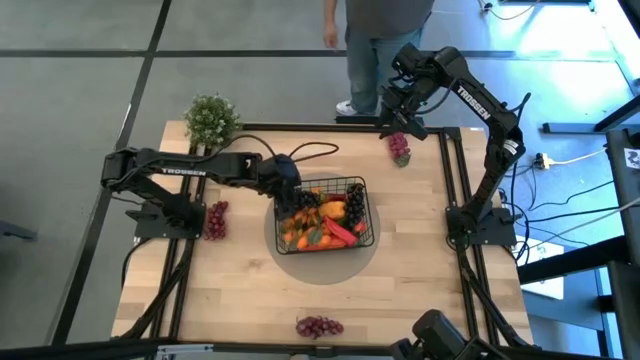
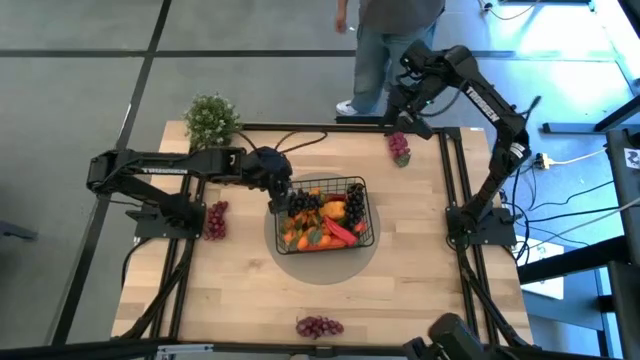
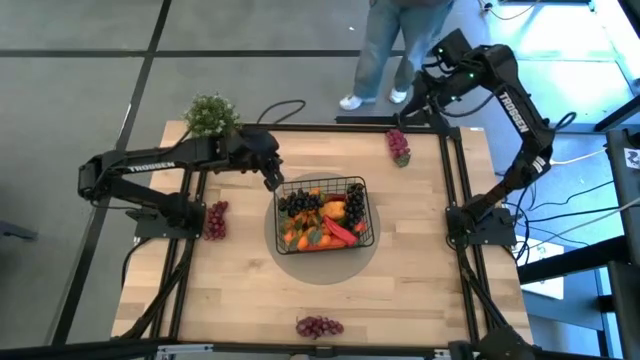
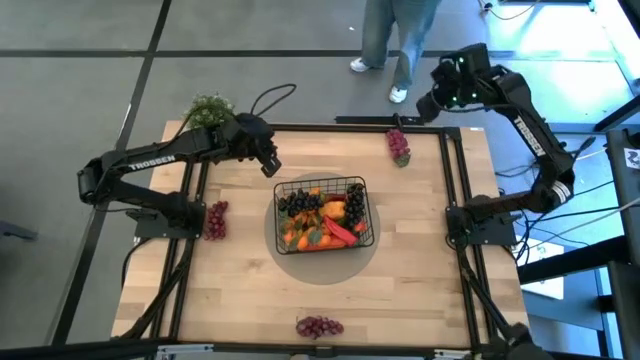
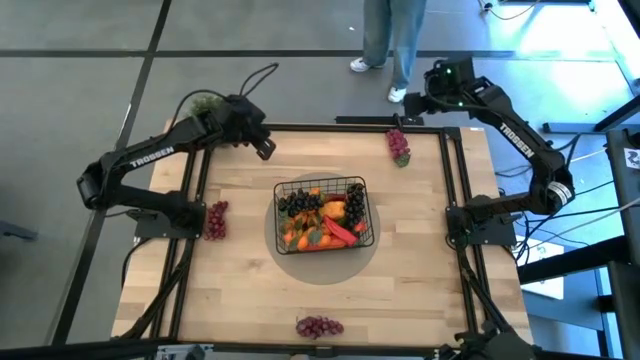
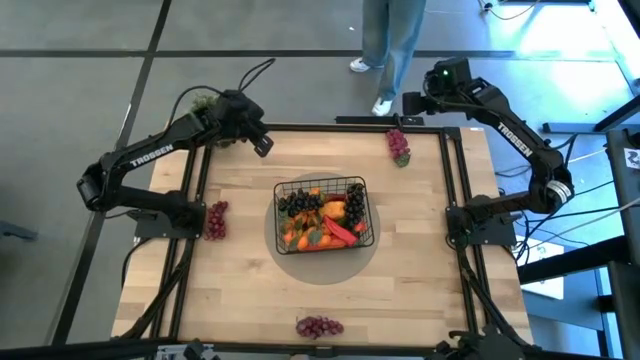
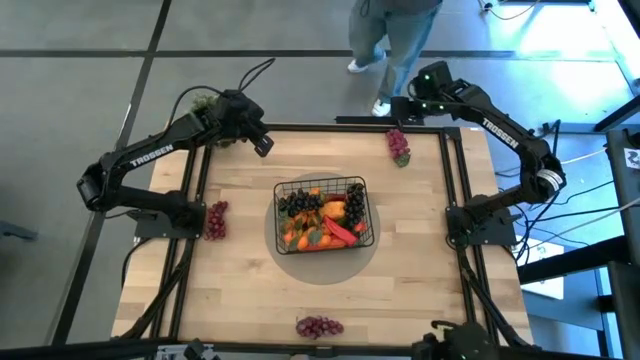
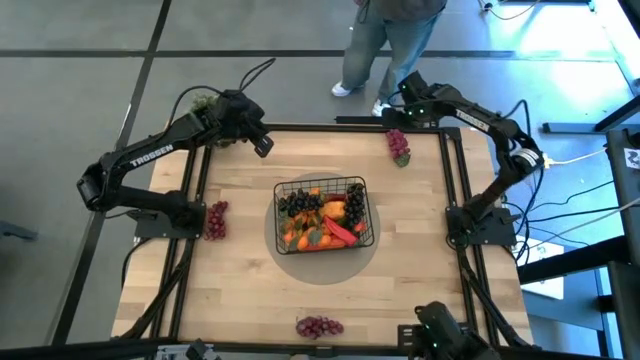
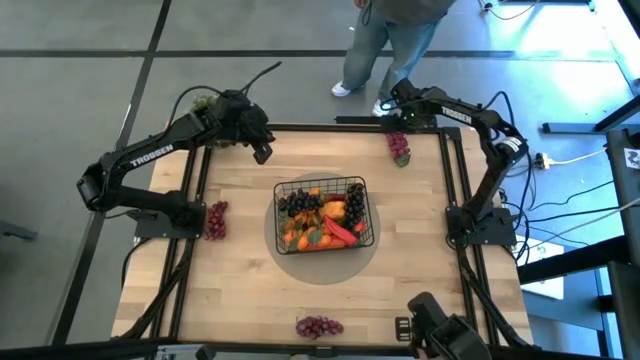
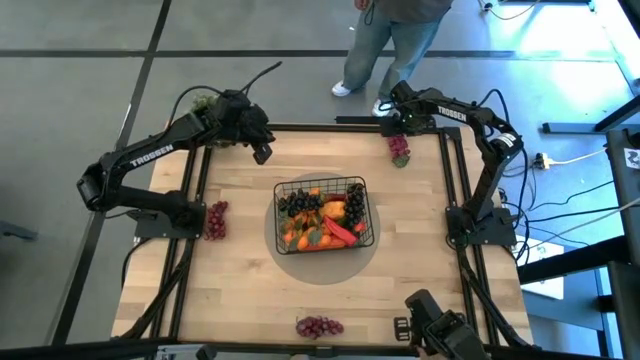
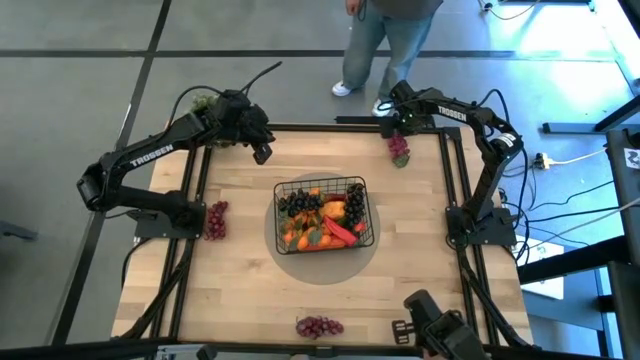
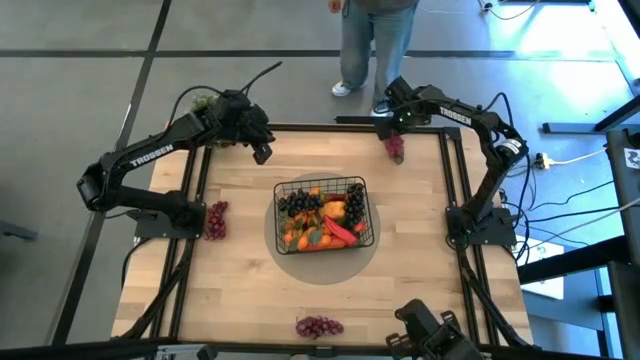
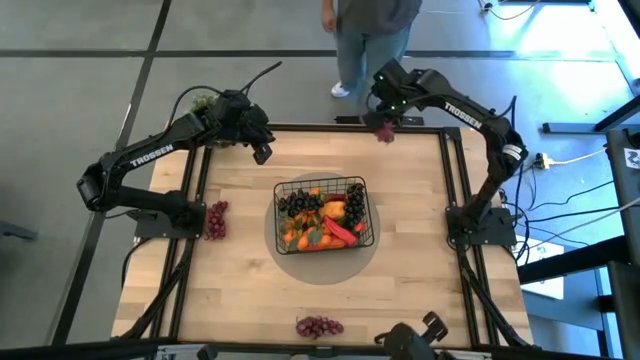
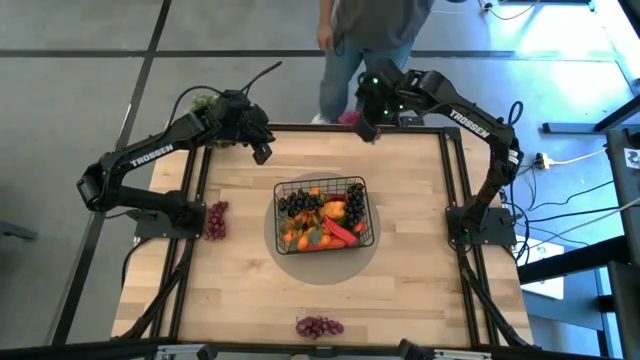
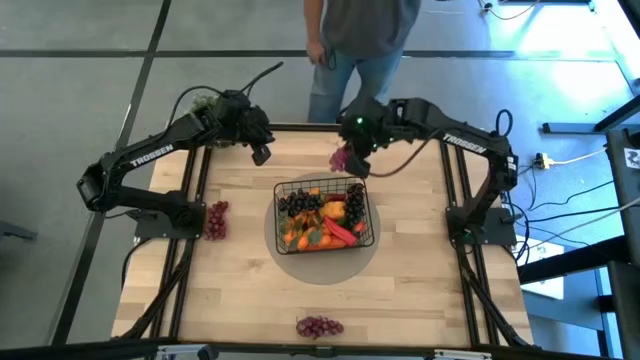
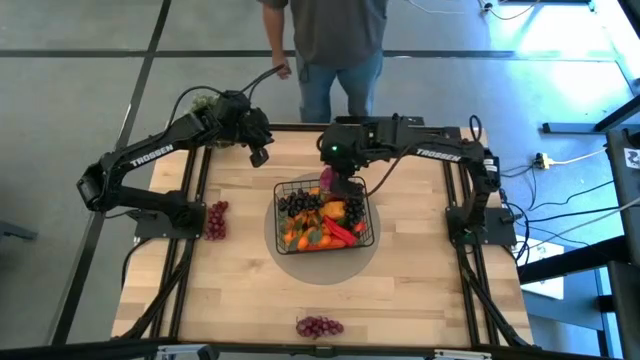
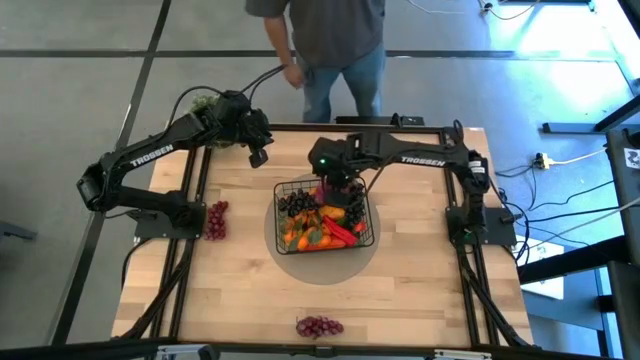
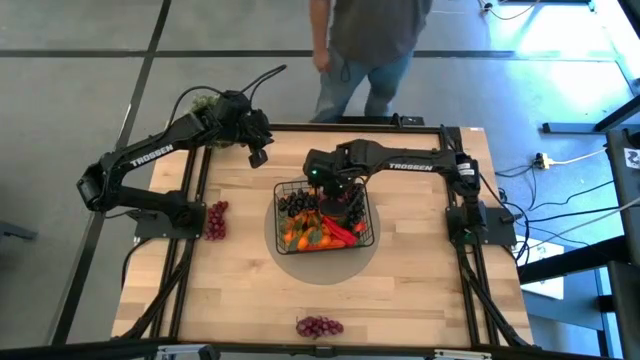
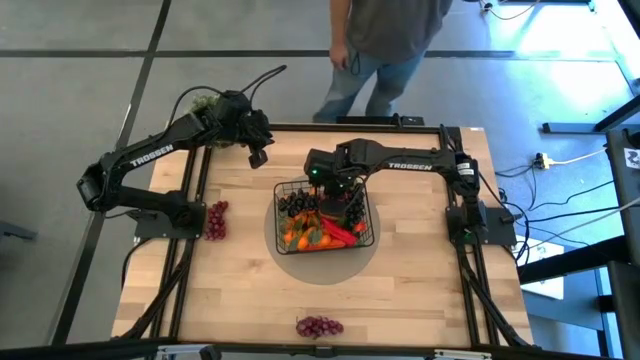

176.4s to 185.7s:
Task: Build produce basket
Put the top right purple grape into the basket

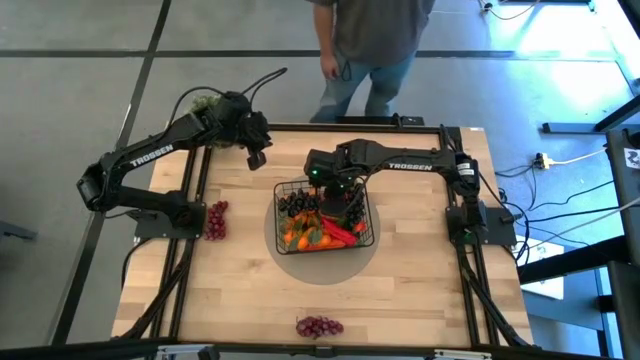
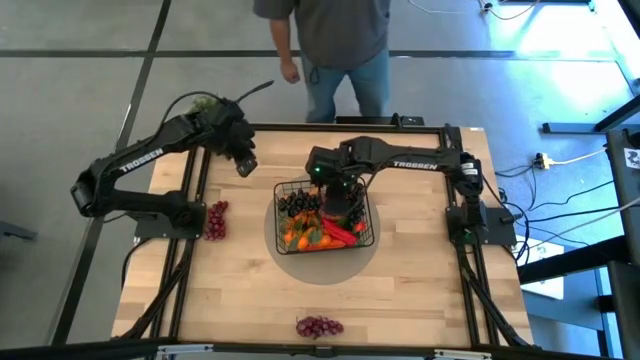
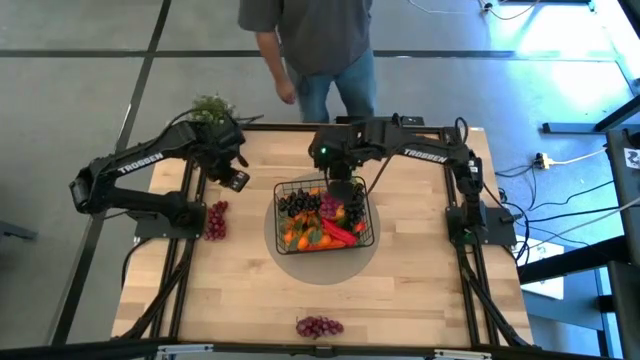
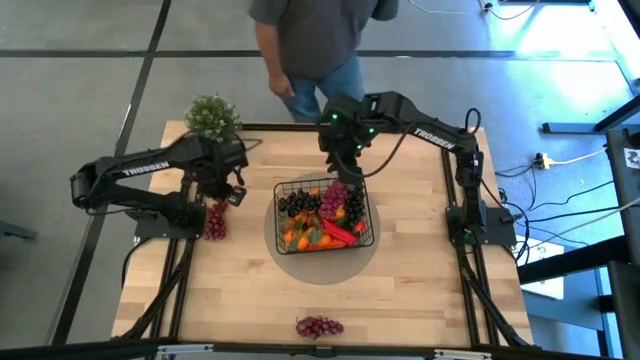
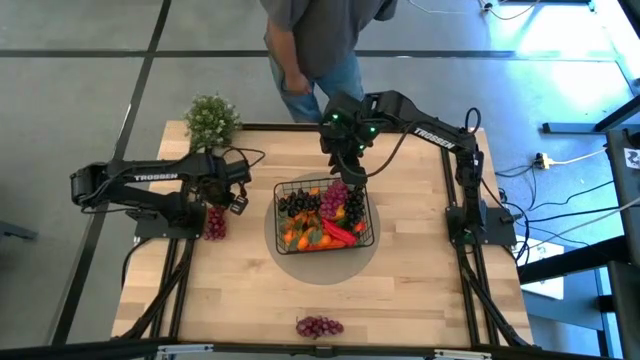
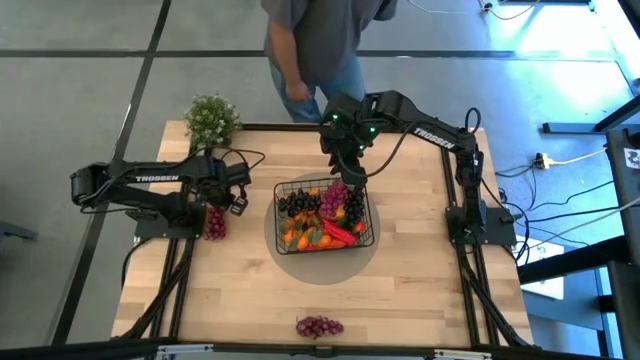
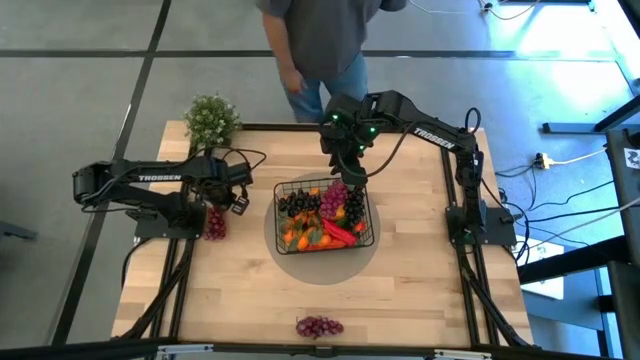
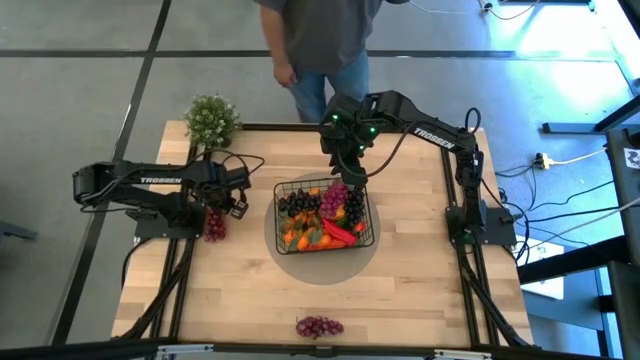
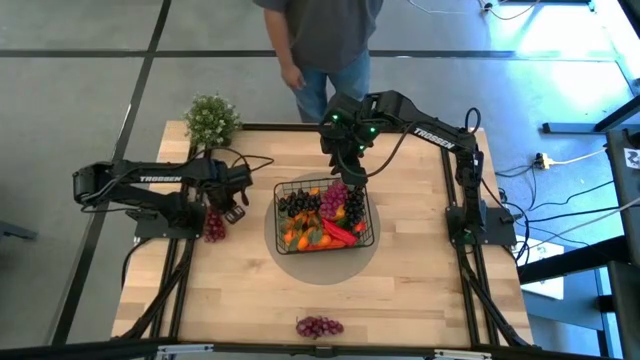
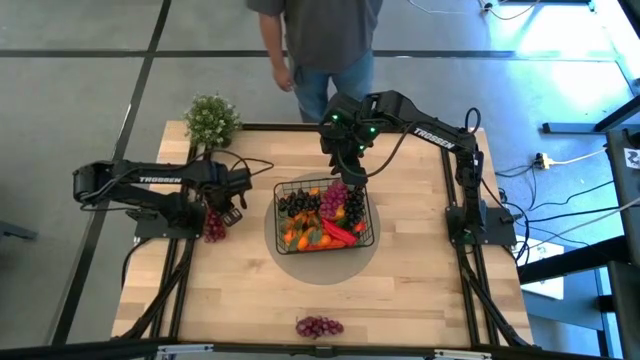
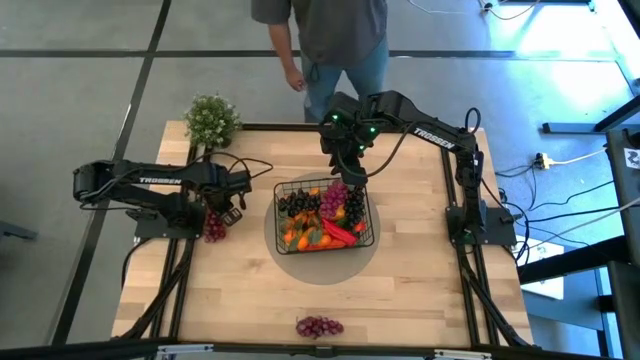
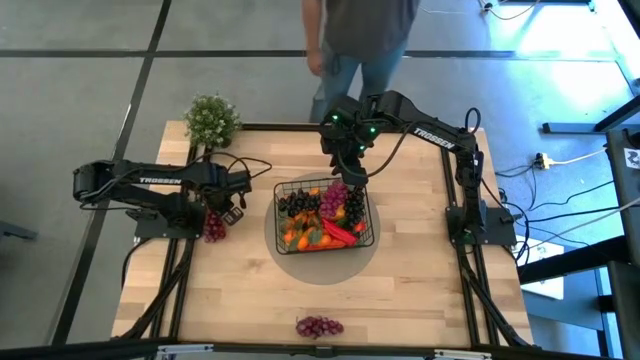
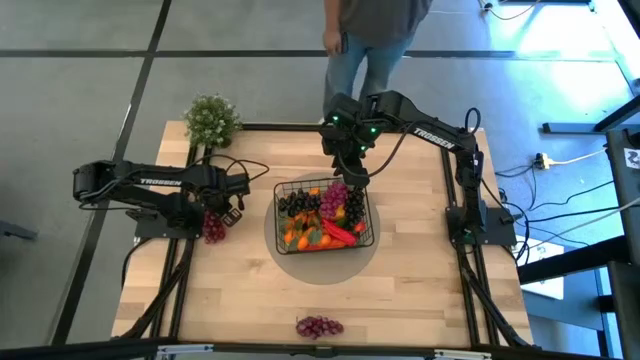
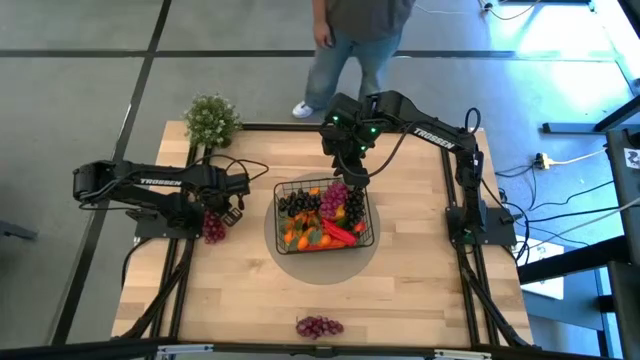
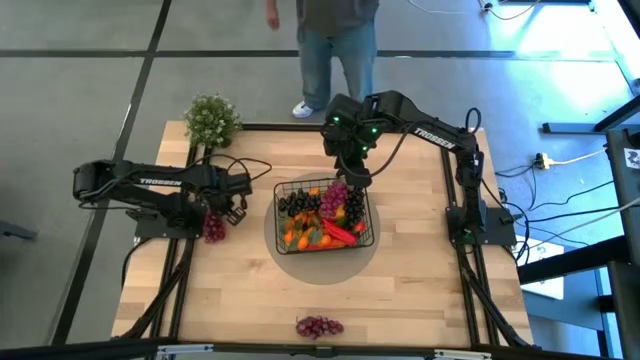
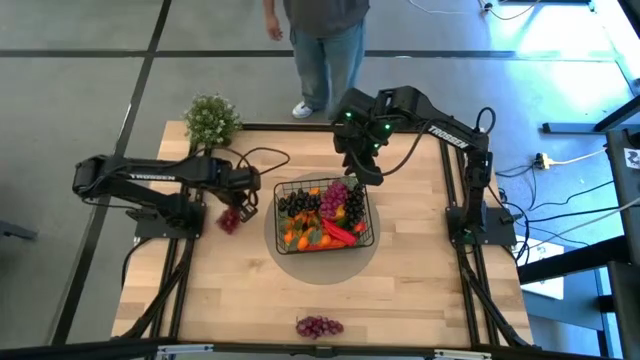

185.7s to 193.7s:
Put the left red grape into the basket

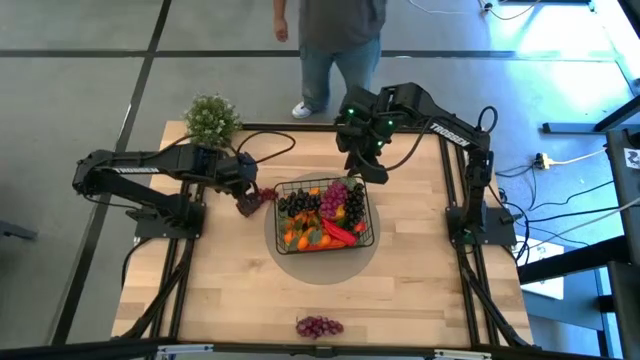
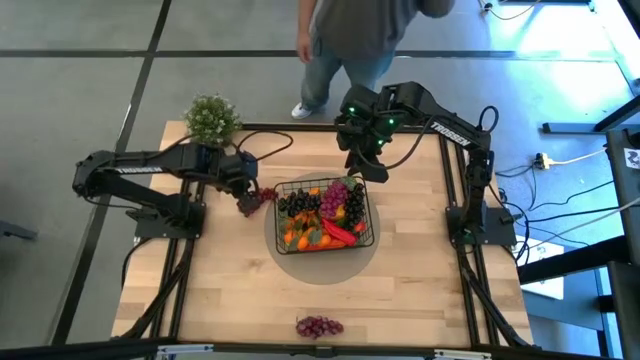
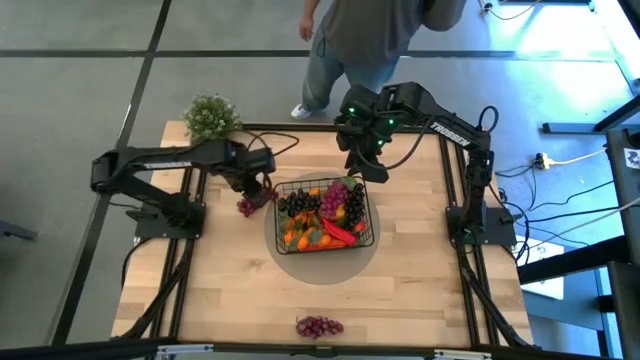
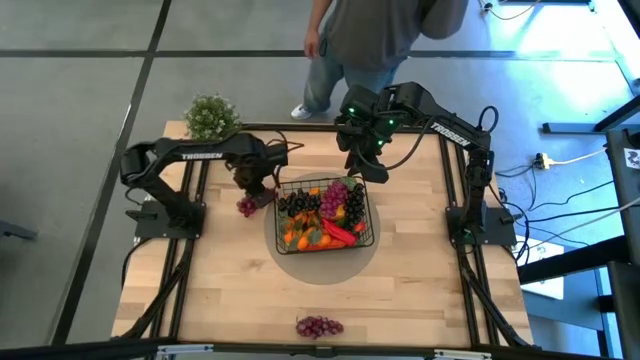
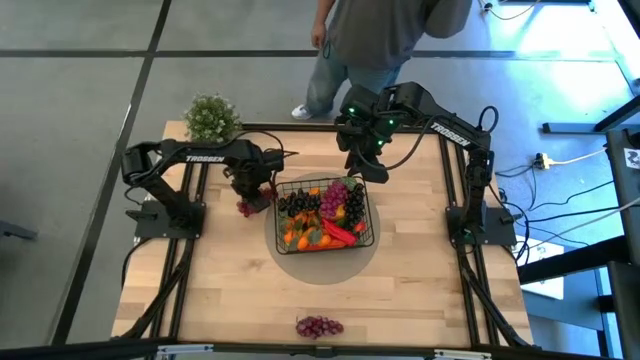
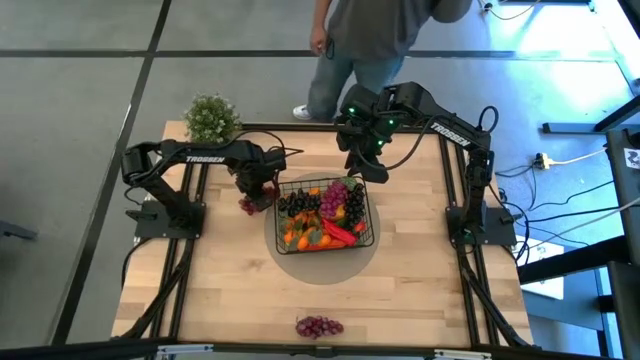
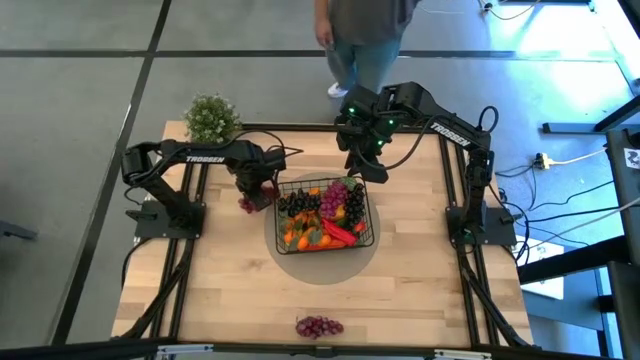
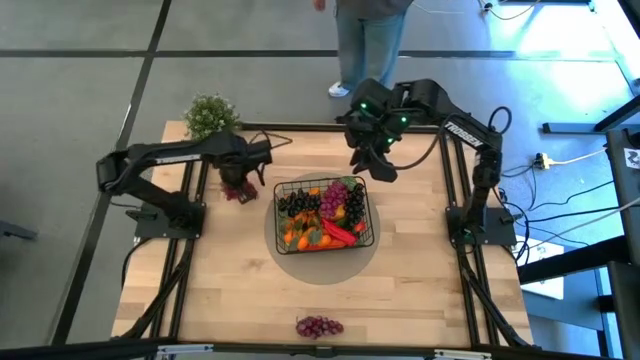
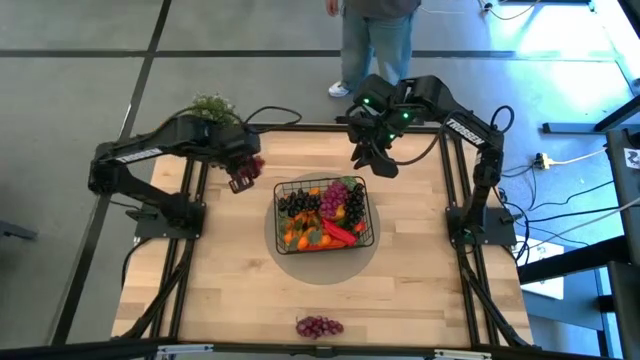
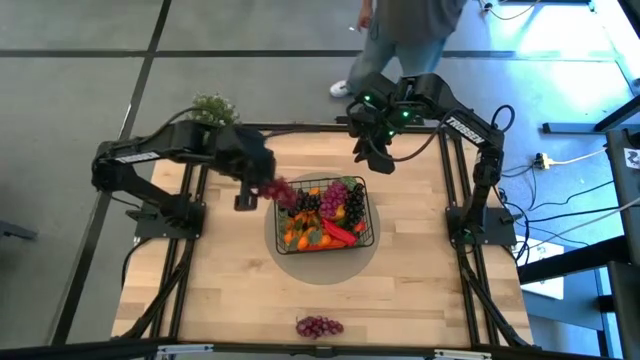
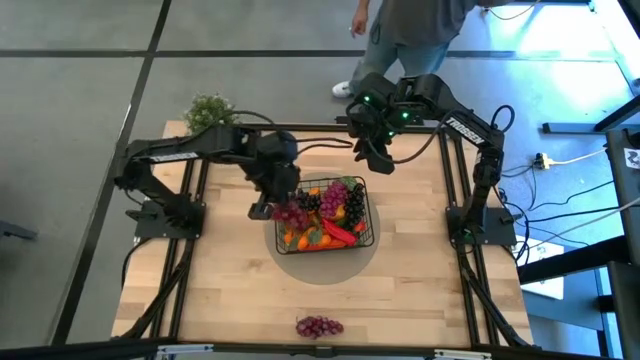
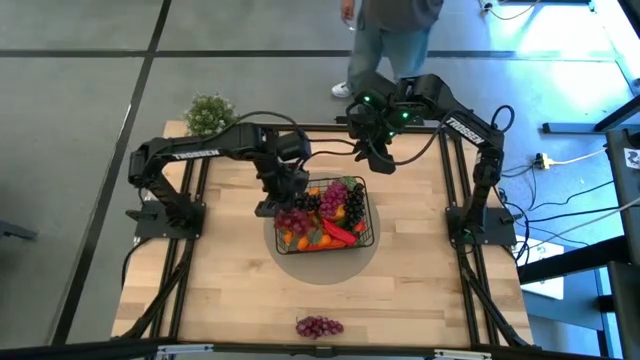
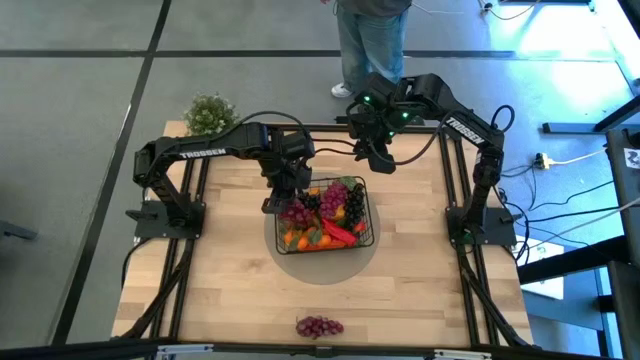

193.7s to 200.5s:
Put the left red grape into the basket
